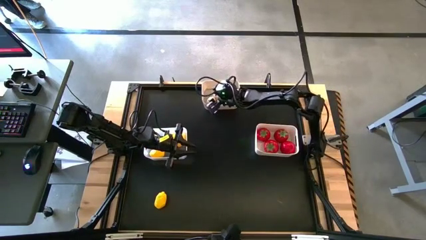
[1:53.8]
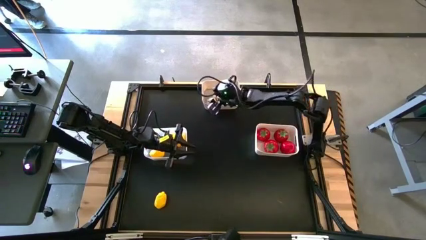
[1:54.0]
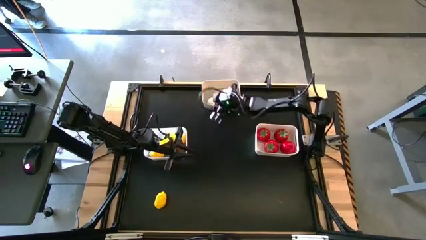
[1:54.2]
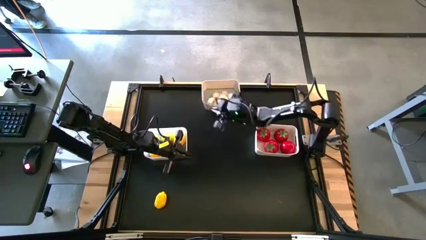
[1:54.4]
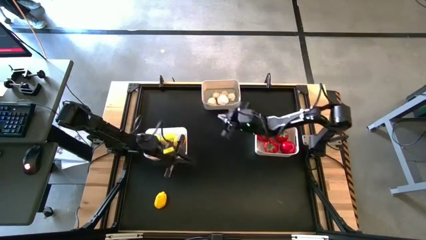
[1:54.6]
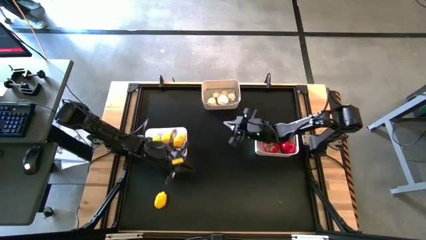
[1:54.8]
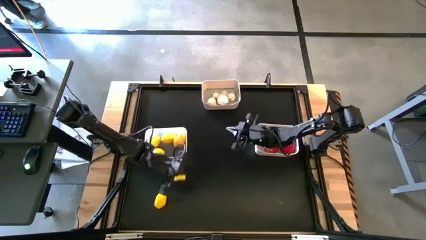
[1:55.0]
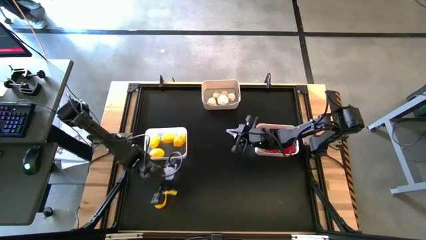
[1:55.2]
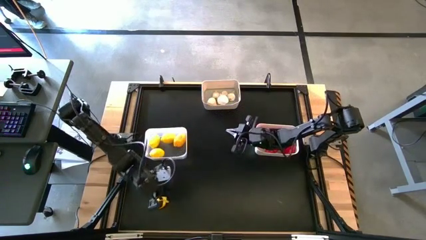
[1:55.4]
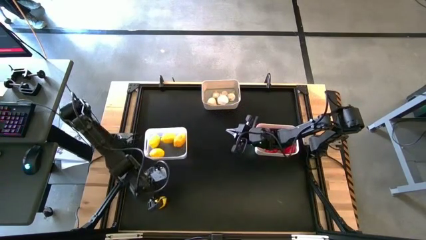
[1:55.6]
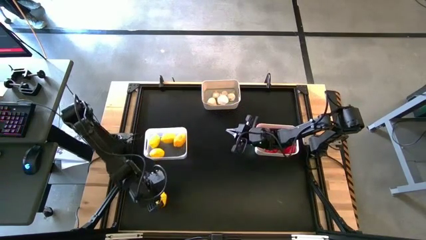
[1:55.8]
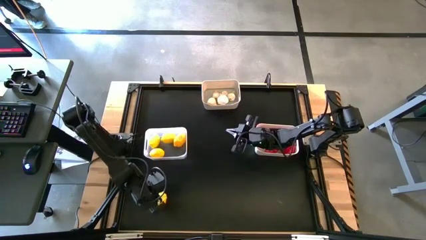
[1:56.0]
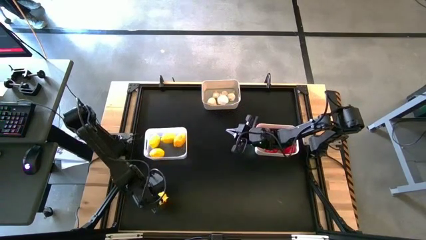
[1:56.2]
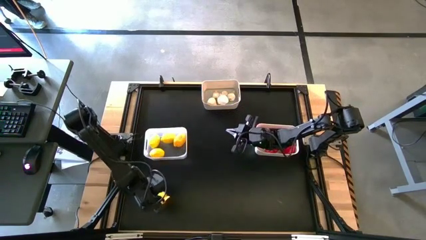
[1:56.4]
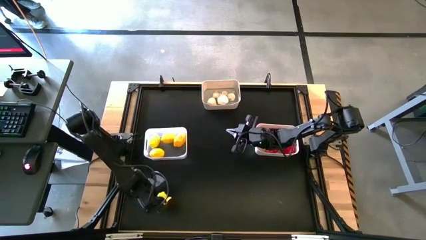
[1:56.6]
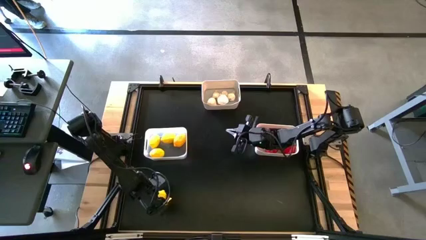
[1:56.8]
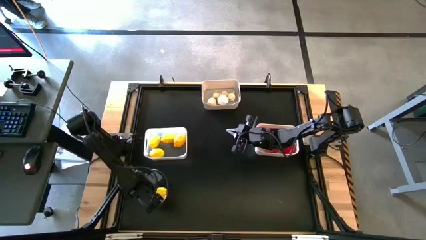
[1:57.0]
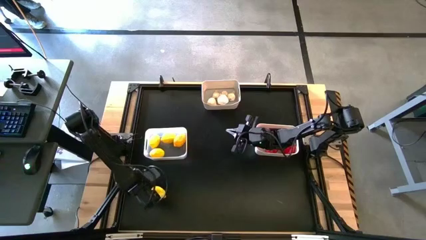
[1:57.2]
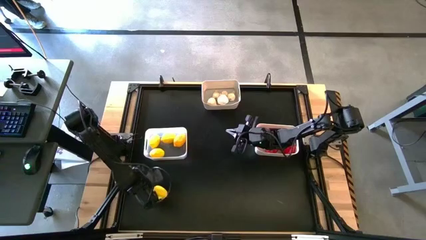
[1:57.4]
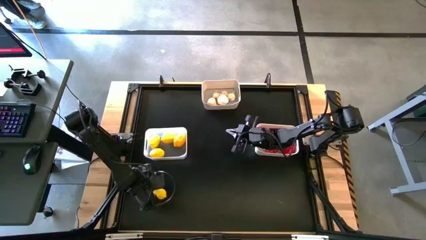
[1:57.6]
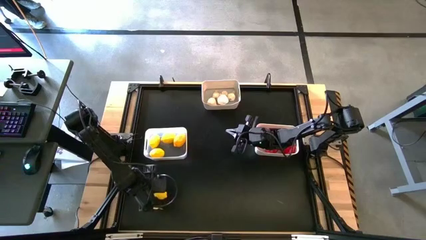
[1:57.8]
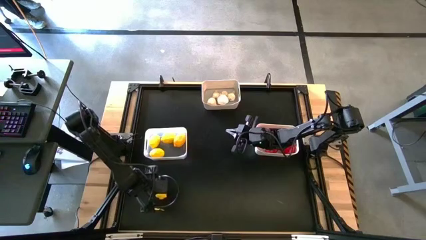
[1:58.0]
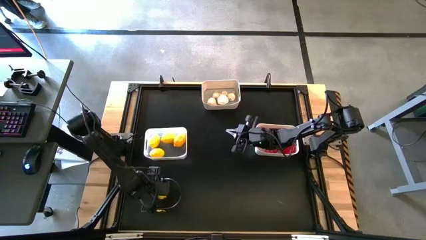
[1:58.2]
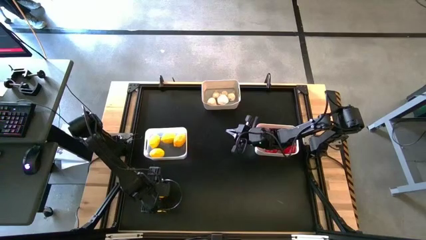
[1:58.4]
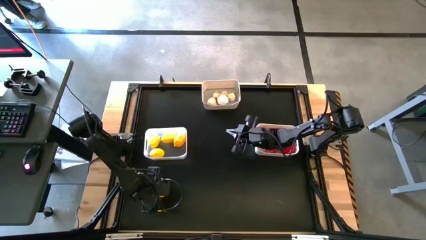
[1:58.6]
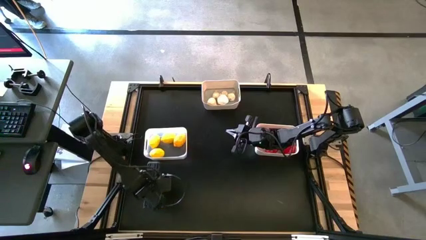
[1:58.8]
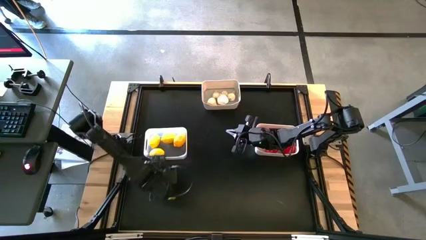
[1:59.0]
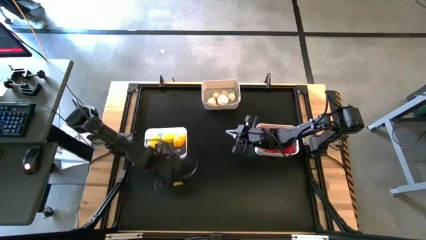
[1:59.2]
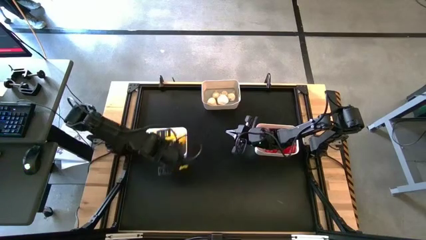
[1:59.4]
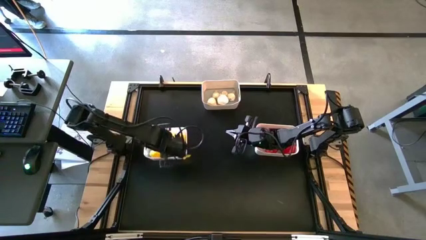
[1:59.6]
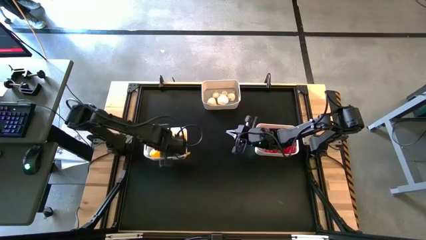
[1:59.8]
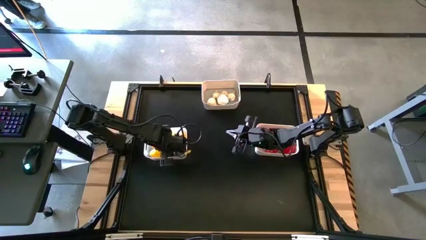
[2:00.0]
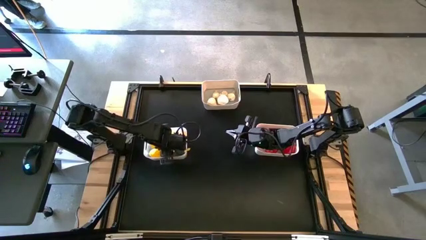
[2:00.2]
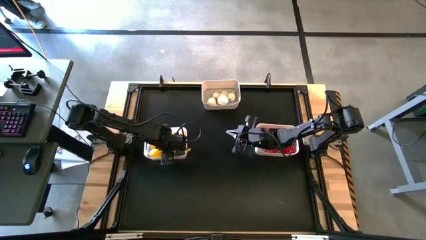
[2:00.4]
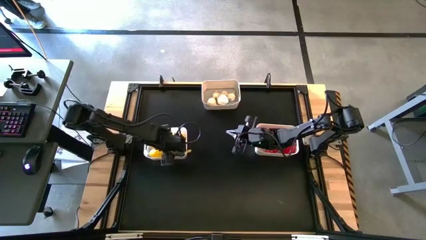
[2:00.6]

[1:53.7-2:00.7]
Task: Sort produce into baskets
Put the yellow lemon into the transparent bin

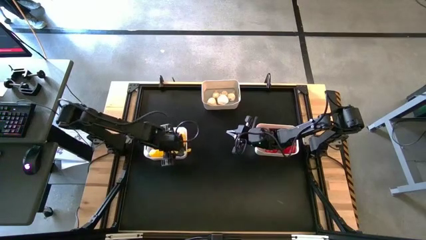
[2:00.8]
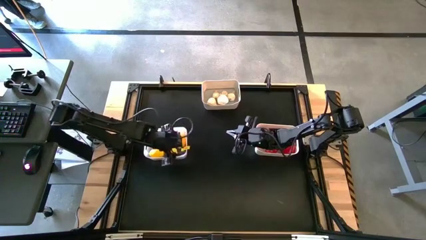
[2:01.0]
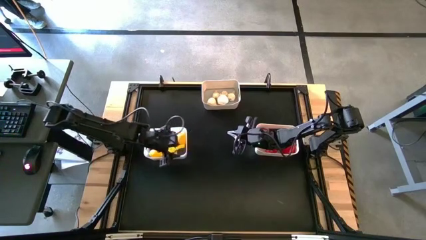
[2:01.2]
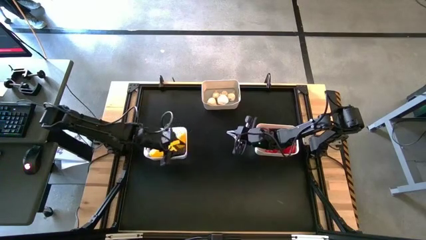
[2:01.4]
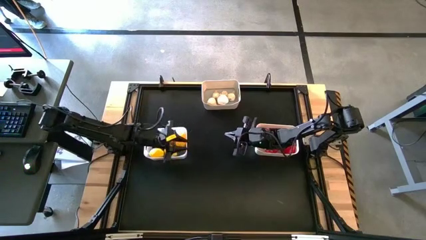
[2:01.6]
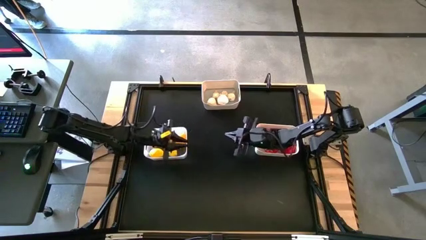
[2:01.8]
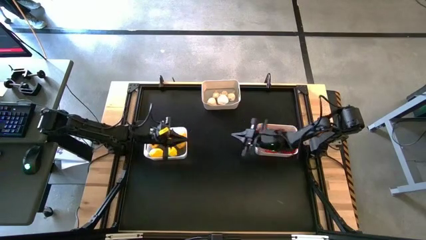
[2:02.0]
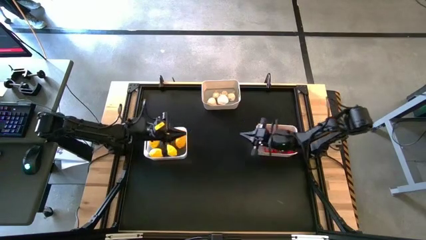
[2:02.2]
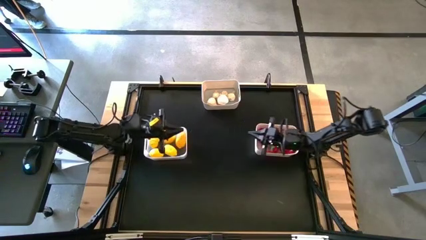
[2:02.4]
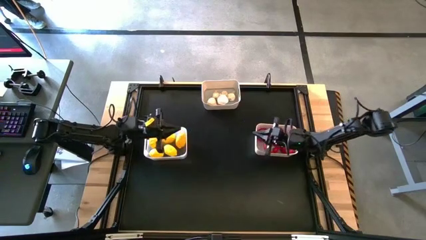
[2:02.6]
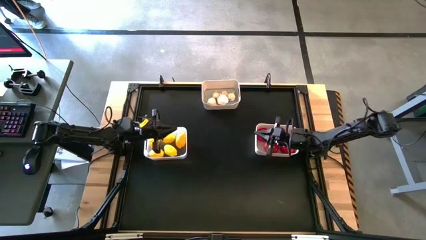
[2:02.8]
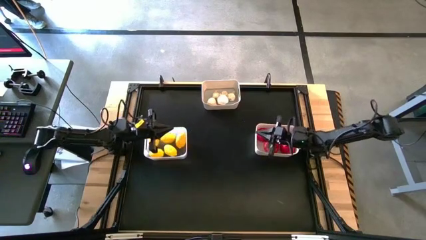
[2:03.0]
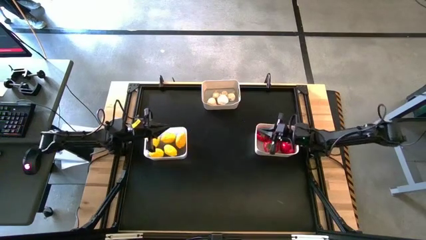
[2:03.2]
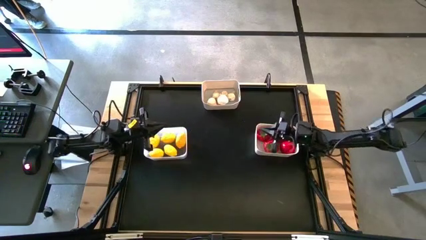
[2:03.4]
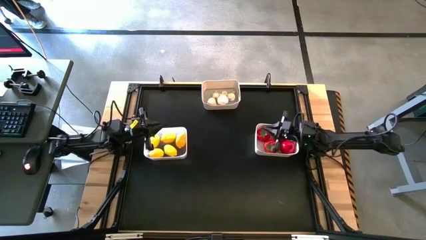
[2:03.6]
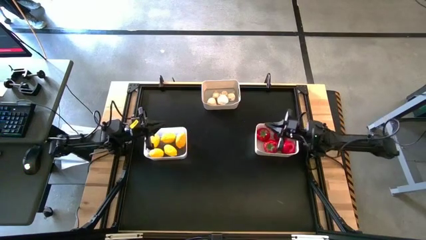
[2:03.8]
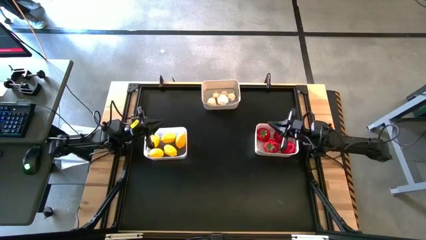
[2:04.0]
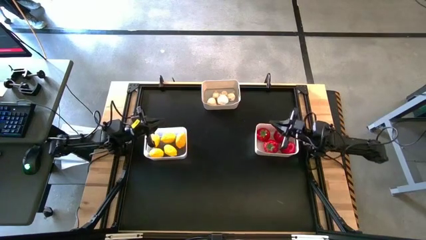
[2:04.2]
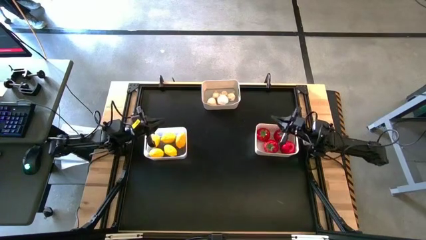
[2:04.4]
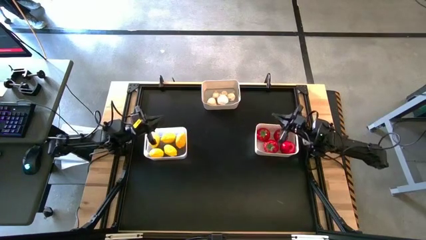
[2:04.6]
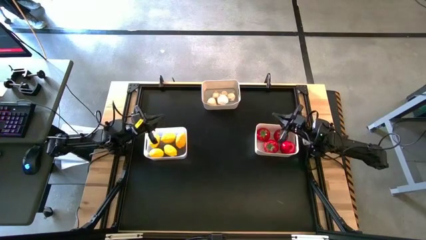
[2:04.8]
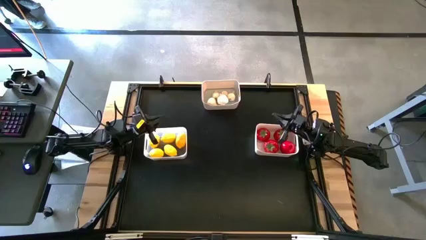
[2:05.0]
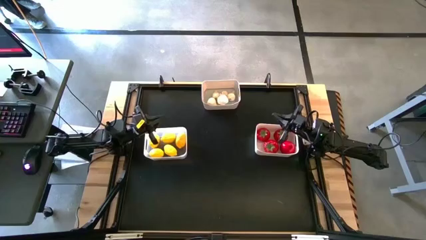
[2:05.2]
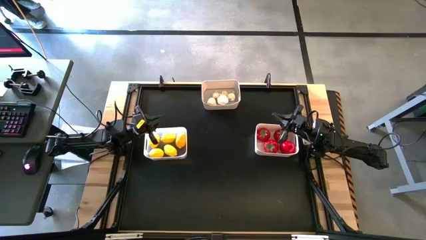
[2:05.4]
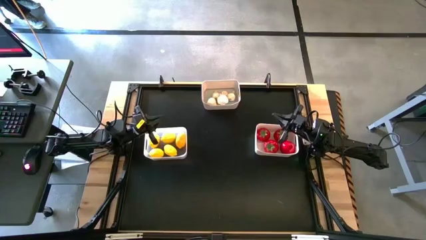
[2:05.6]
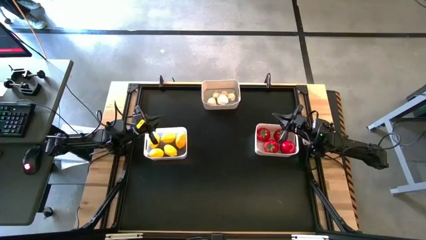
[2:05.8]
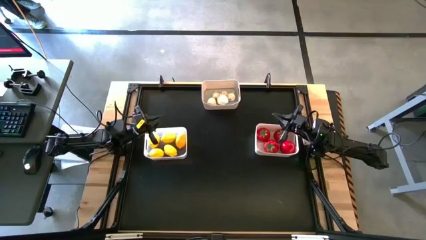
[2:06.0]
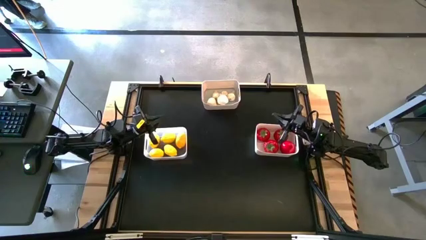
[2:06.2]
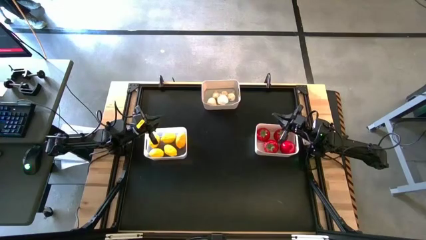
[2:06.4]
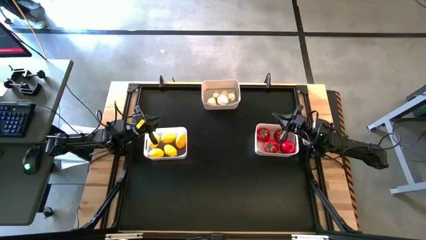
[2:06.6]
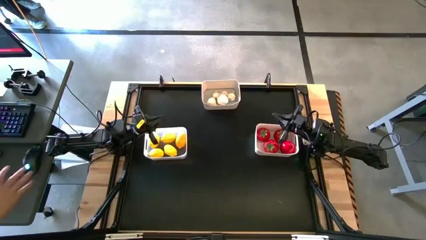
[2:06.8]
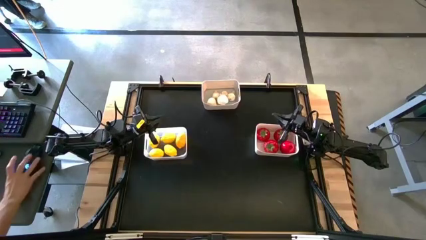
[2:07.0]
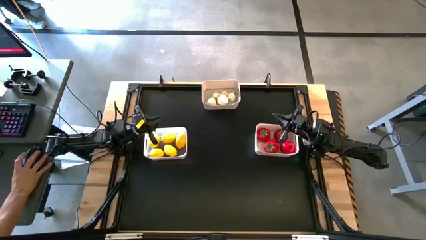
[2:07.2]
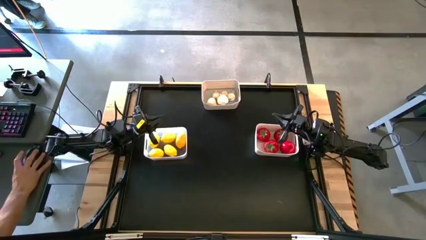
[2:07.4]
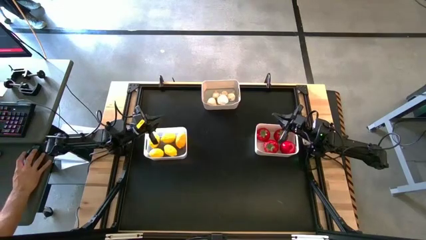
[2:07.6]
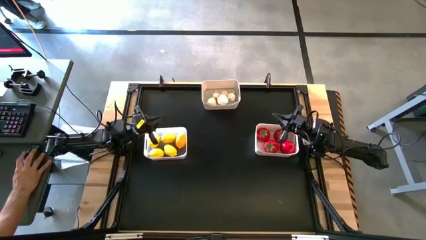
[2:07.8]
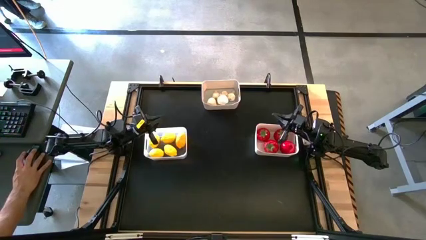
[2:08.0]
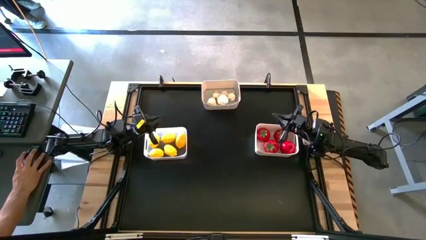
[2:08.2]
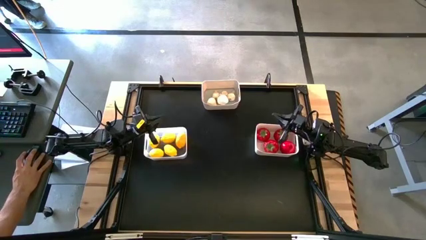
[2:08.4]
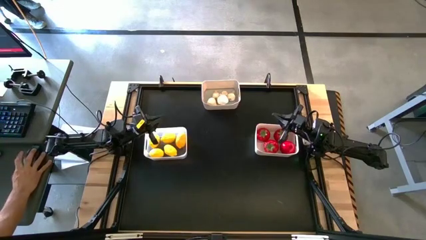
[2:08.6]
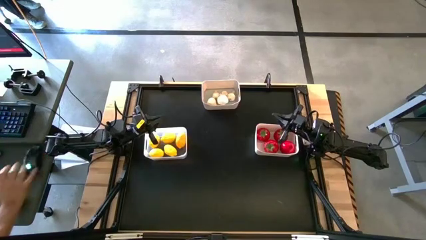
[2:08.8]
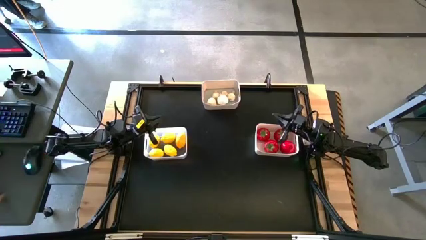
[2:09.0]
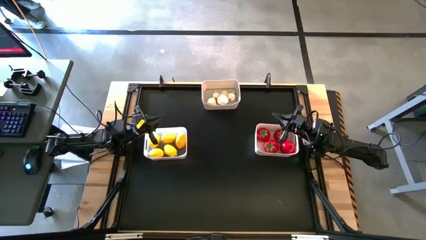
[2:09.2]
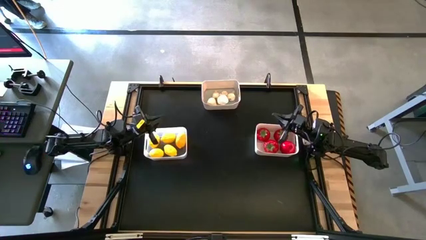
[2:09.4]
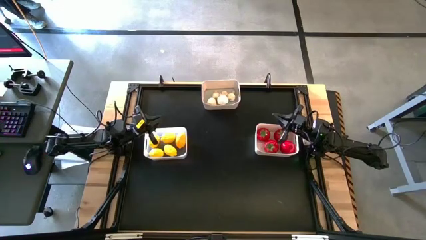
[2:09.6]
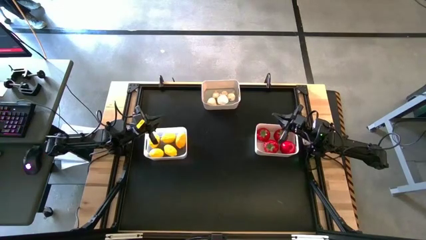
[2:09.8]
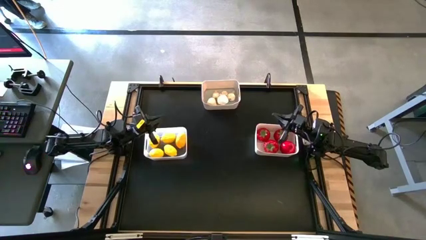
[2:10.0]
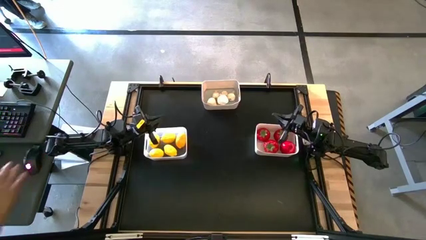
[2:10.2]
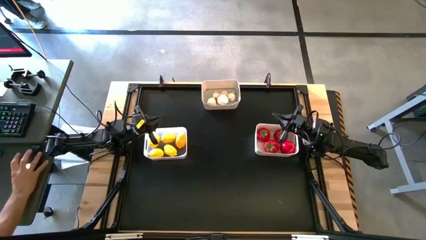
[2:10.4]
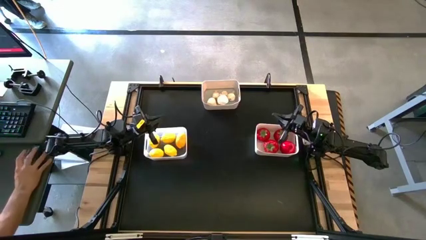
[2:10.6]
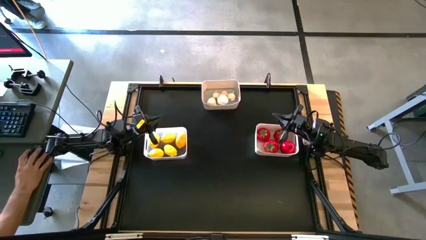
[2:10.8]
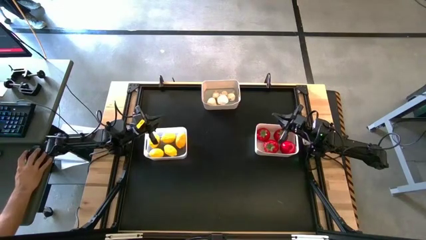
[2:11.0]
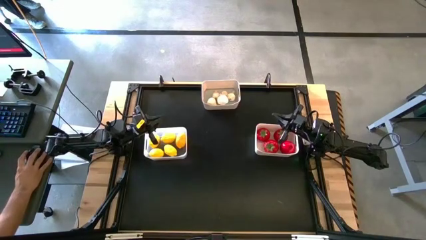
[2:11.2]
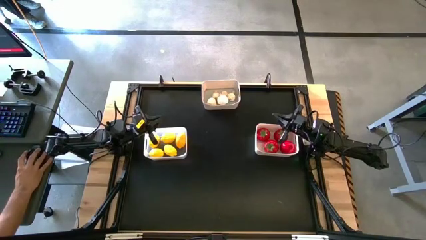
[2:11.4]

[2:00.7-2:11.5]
Return to Home Position
